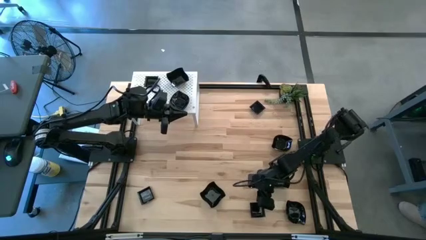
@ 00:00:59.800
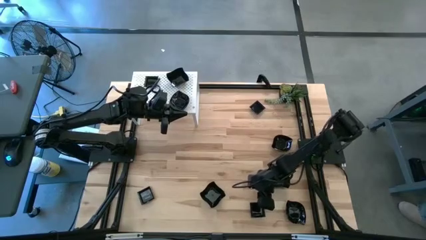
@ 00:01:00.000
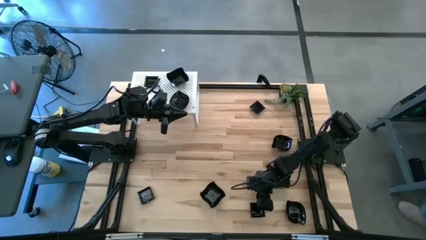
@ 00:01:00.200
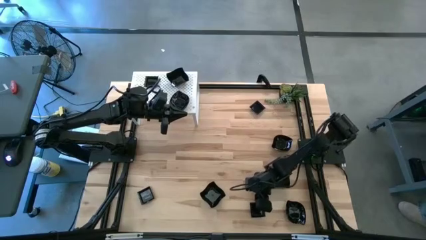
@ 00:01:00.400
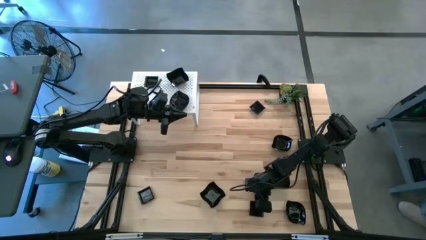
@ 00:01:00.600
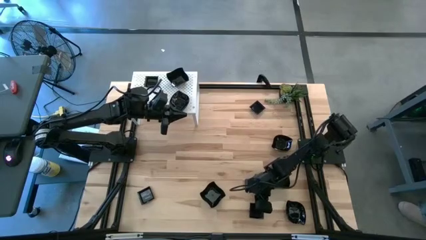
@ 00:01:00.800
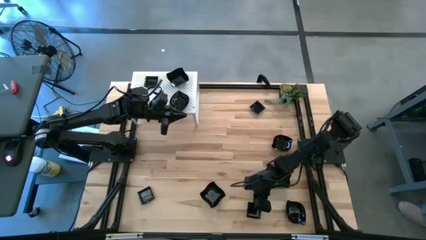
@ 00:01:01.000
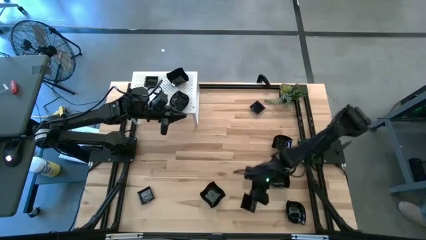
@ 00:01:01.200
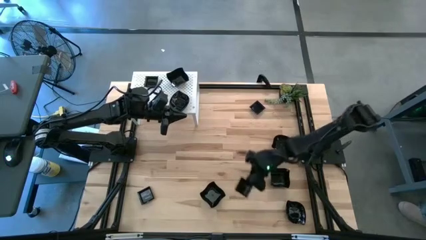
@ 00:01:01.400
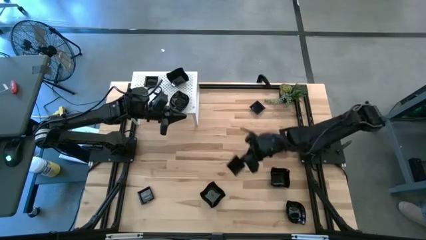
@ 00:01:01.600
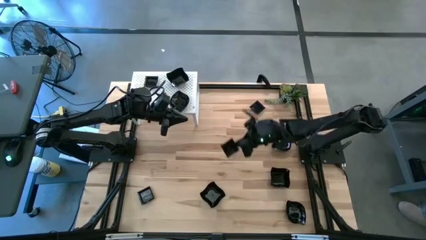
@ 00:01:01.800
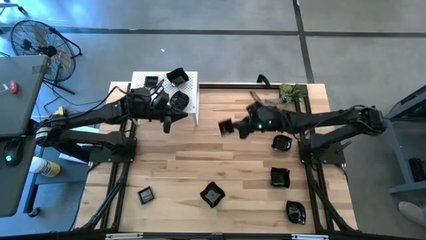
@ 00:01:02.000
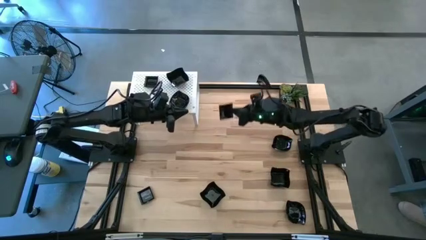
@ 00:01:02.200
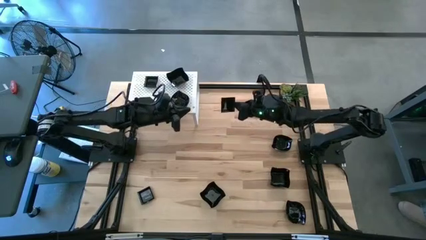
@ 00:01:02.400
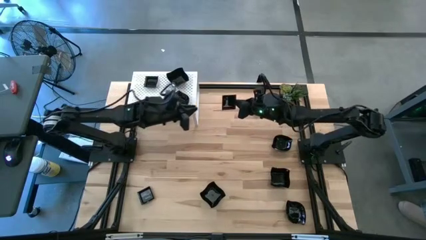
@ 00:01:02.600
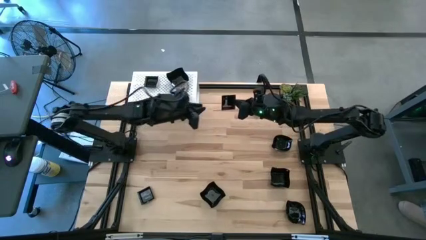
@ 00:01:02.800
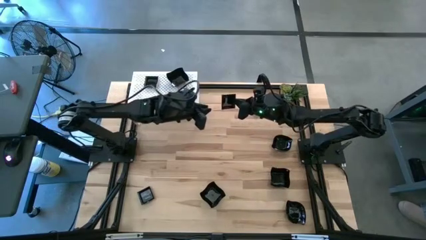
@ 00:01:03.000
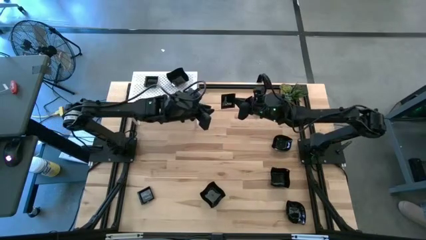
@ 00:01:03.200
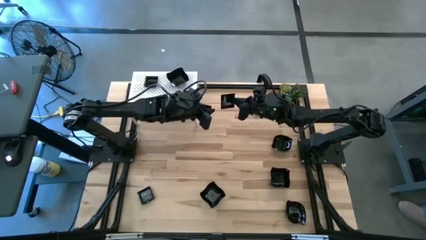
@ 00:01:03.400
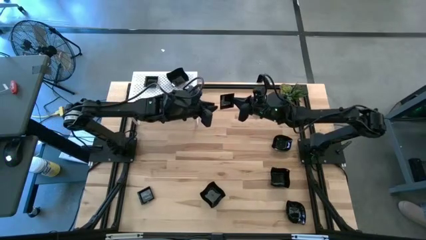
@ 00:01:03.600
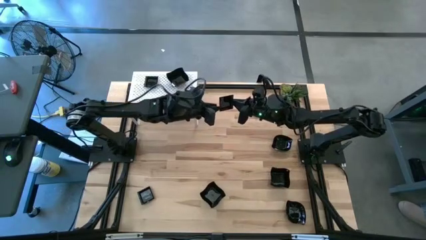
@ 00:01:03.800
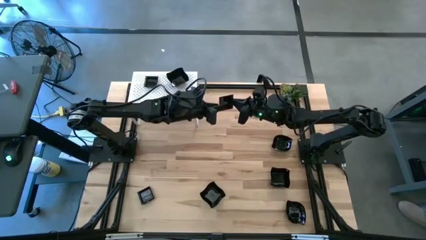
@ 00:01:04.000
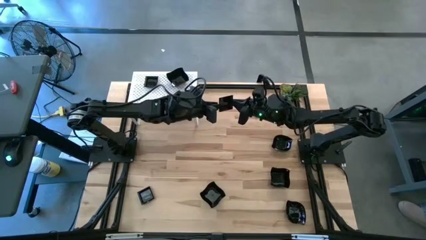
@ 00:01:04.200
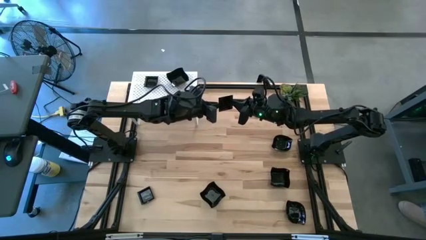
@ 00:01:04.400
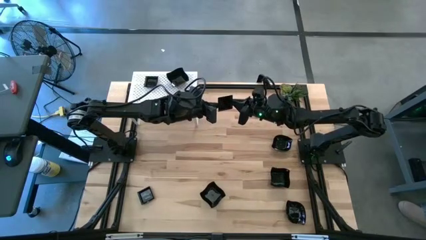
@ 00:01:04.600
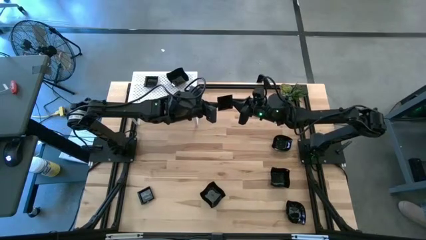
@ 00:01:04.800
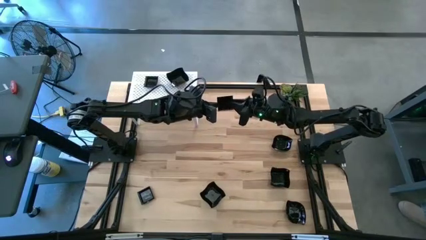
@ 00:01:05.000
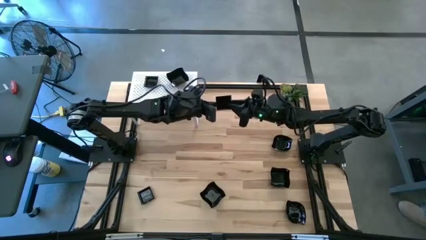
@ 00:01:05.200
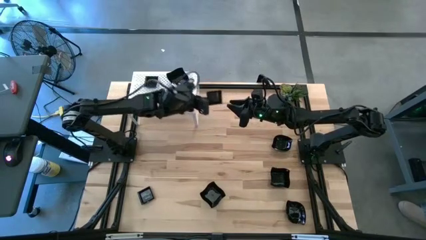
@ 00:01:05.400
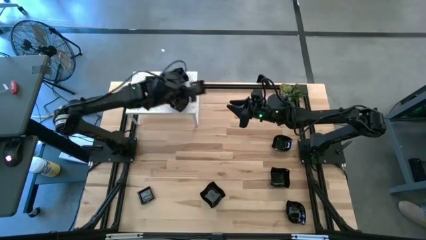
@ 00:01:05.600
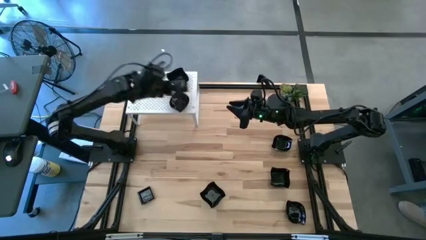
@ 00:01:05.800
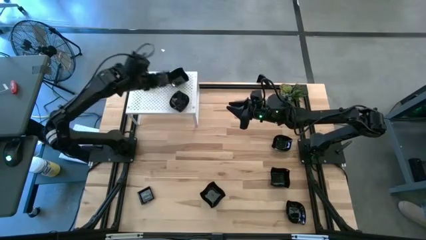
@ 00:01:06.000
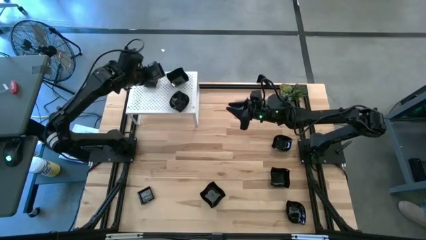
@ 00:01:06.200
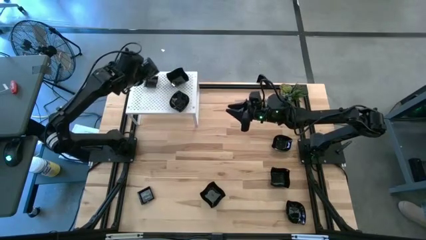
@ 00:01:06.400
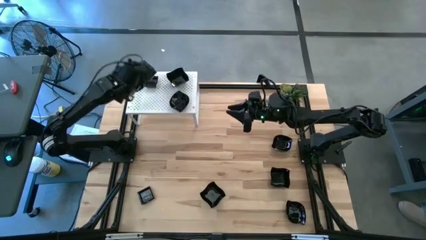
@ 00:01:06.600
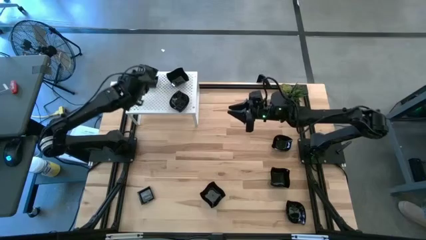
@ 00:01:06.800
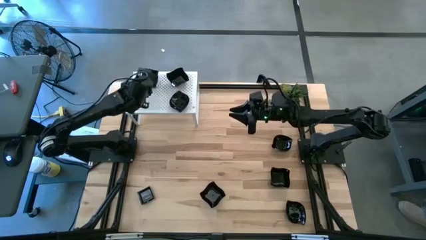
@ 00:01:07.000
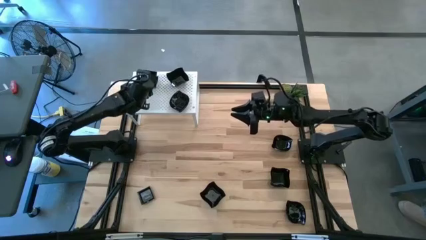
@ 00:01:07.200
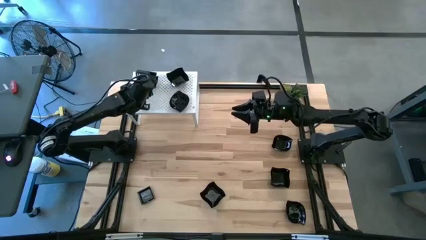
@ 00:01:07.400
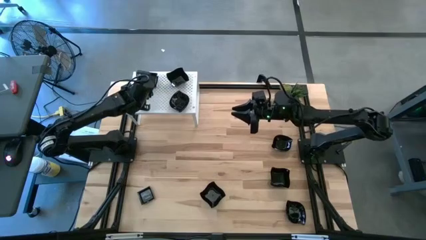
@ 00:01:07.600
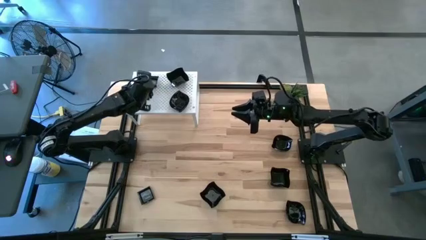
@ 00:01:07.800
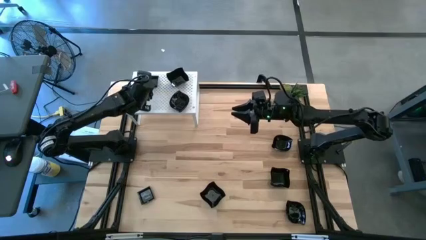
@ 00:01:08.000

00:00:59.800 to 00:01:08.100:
Task: Pick & Place Mini shaped plates
Stack the black square plate on top of the other black square plate on the shelf

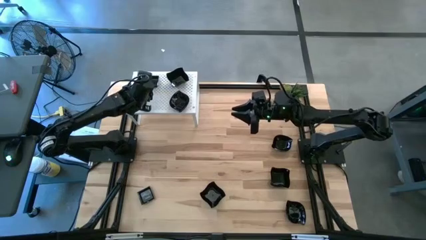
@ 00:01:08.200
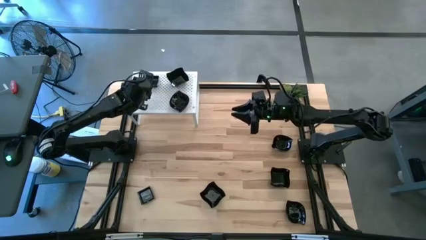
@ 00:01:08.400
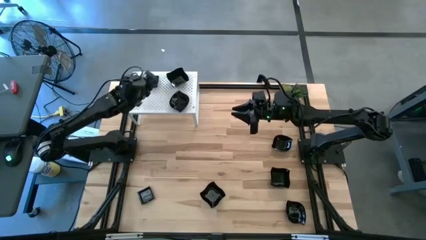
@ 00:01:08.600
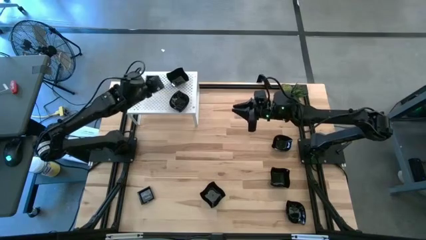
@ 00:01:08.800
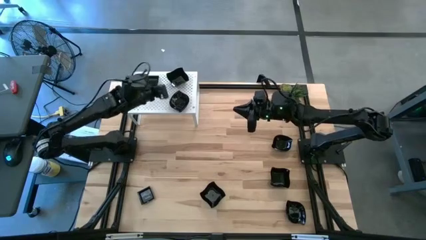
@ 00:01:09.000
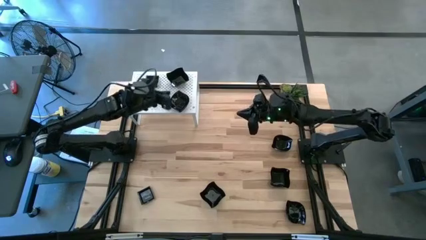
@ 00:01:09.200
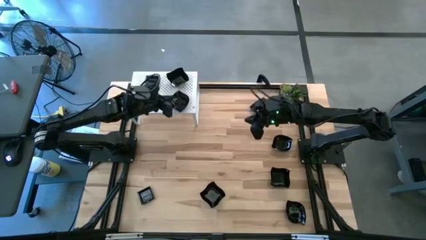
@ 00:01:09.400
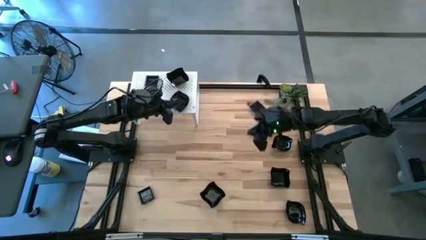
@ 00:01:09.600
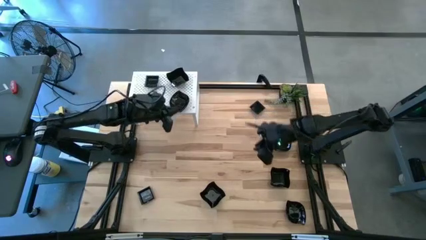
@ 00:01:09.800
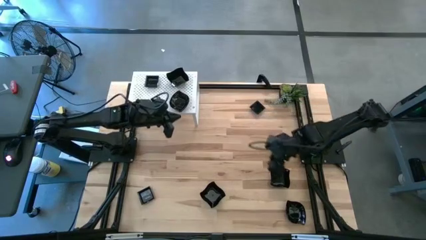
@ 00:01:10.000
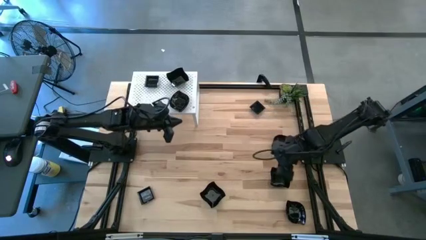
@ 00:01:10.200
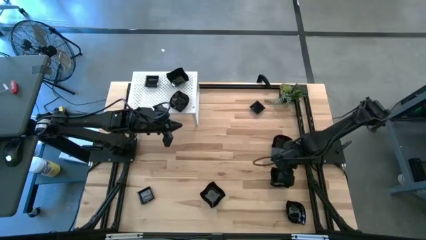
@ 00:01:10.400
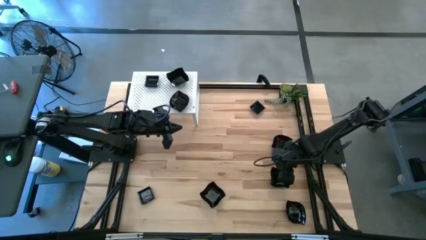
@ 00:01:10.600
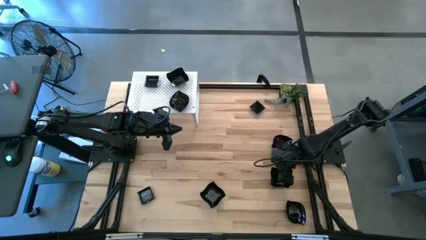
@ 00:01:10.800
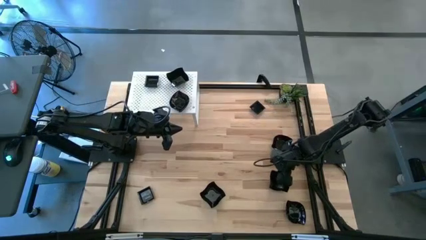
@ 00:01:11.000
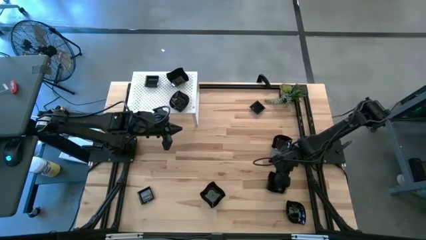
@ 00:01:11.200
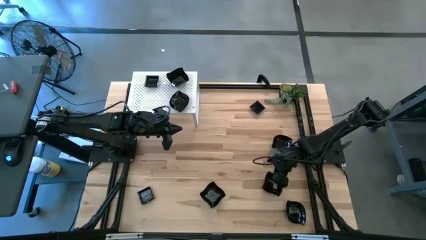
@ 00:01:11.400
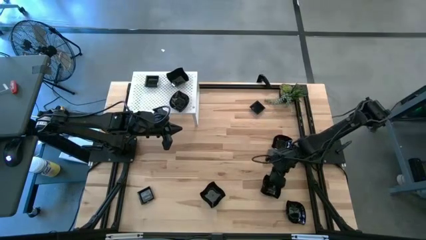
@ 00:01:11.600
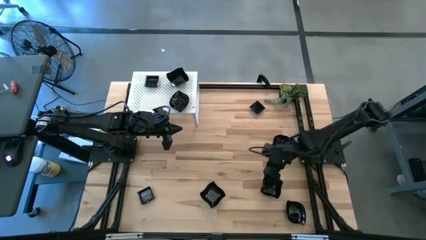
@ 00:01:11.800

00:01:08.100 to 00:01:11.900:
Stack the black distorted square plate on top of the other black distorted square plates on the shelf

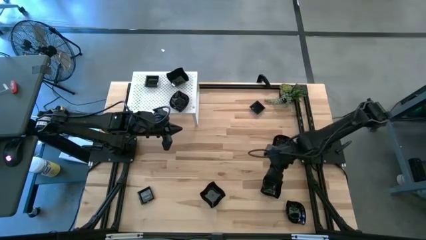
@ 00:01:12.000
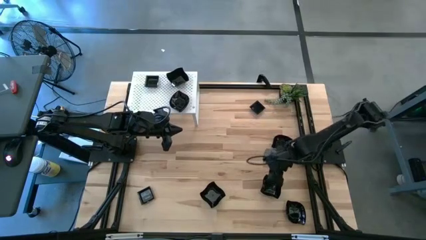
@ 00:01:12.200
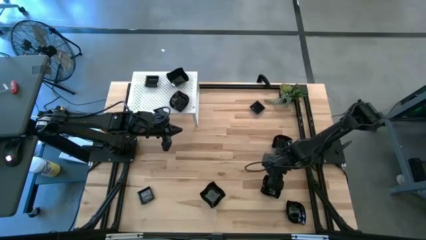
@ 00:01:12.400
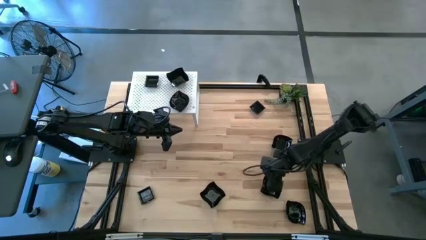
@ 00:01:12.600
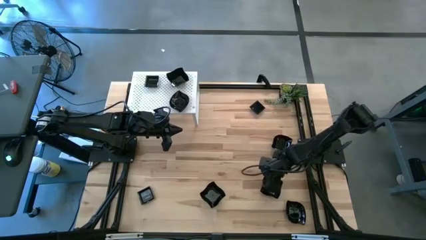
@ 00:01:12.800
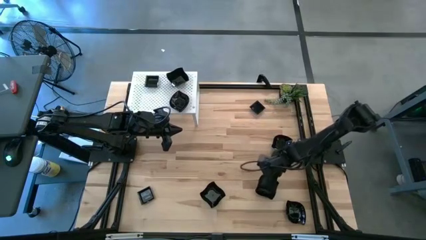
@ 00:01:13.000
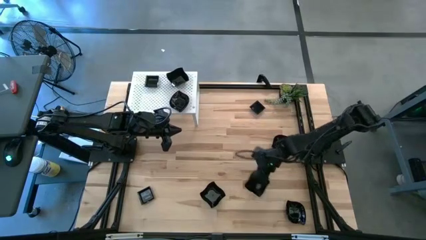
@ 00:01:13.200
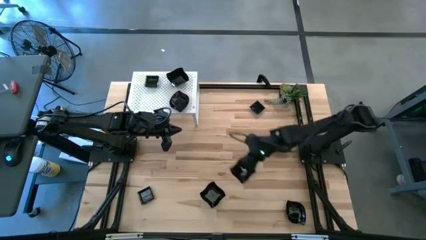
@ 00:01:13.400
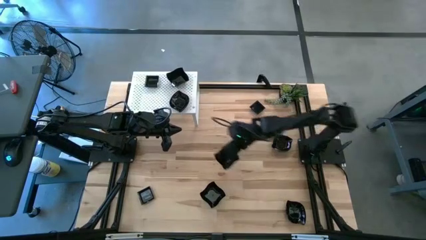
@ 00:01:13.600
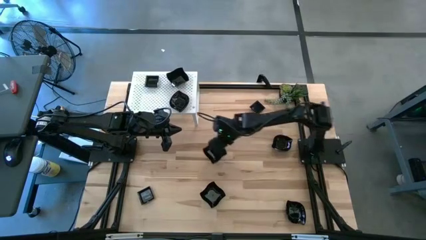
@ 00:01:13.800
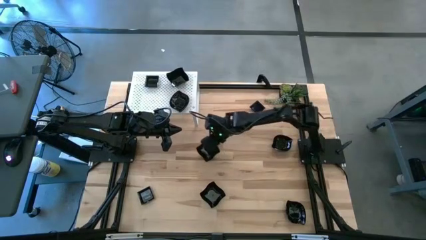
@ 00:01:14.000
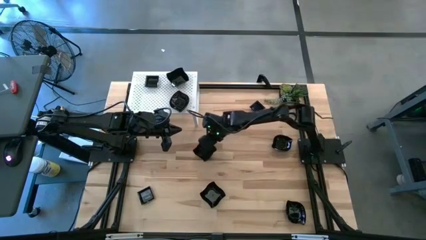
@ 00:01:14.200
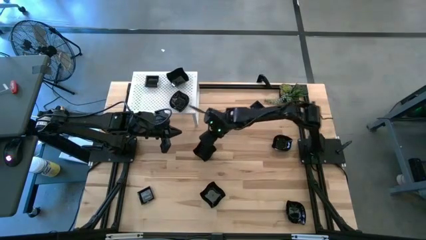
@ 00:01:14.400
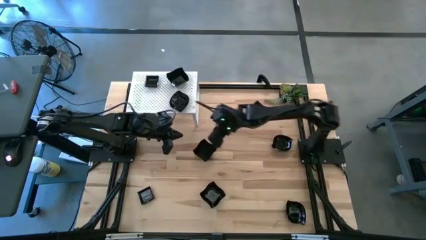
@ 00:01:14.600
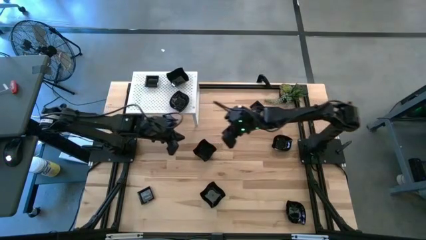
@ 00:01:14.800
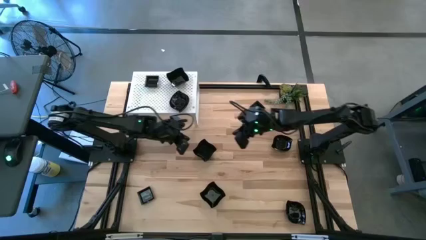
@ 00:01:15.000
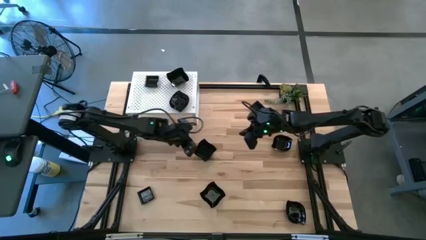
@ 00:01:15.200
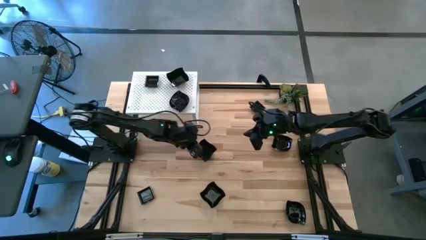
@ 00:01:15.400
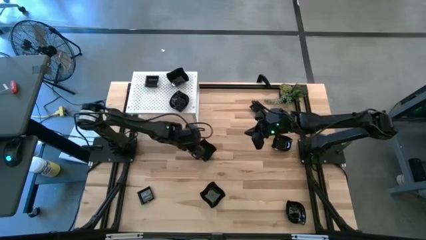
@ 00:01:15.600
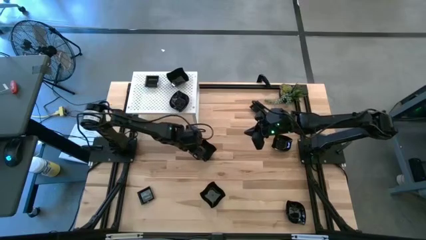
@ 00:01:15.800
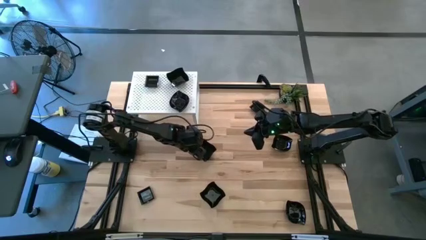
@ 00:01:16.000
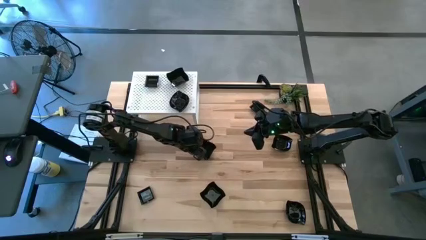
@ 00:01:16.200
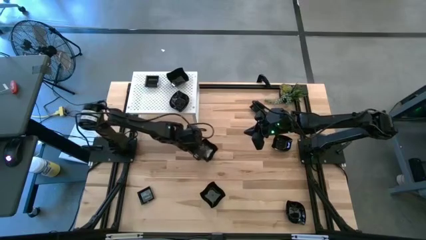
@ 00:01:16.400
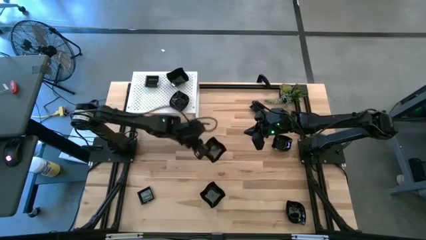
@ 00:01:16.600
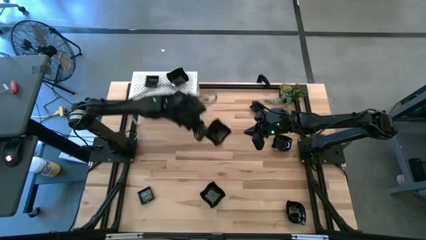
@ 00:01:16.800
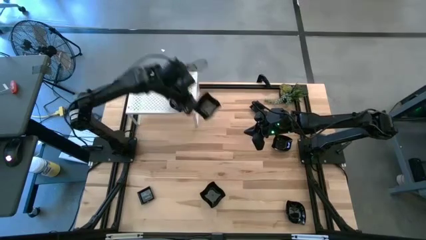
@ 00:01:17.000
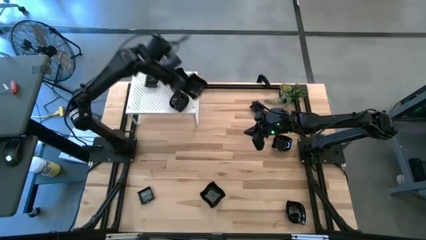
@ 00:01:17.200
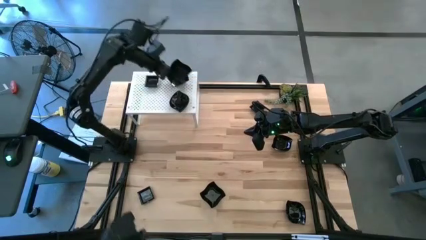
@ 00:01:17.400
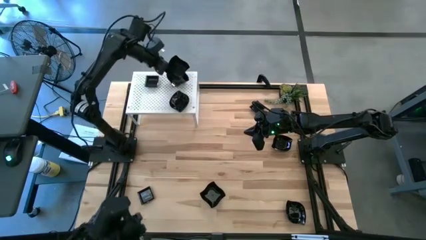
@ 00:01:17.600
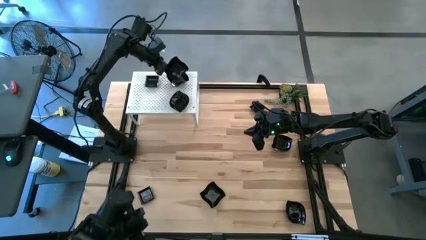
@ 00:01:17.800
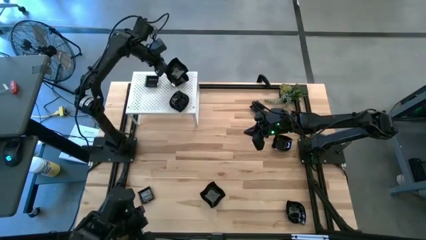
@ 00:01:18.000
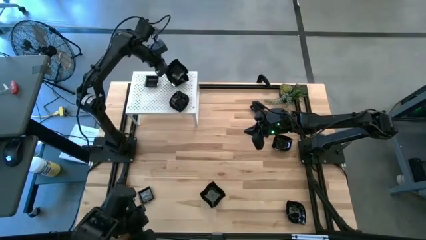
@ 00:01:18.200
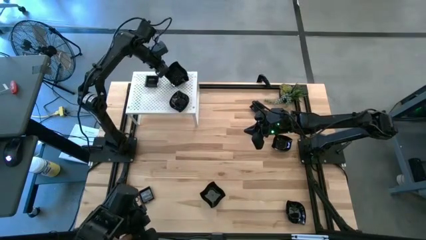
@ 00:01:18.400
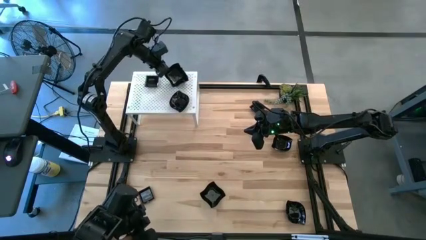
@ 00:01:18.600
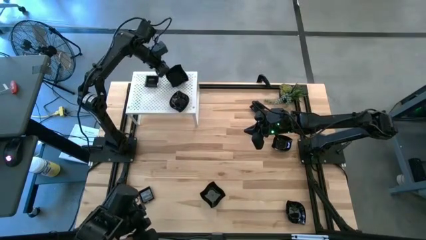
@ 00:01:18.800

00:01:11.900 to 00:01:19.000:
Stack the black distorted square plate on top of the other black distorted square plates on the shelf
